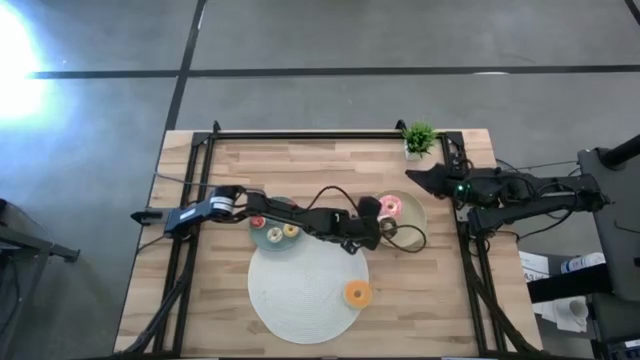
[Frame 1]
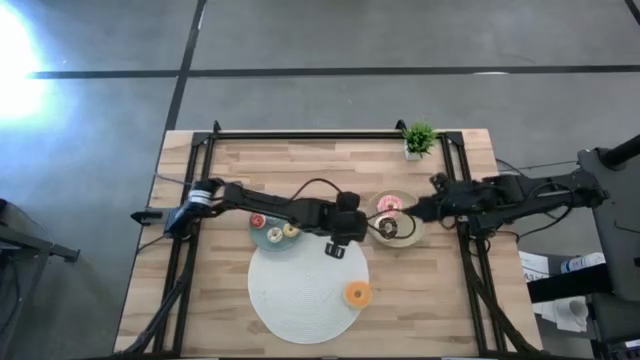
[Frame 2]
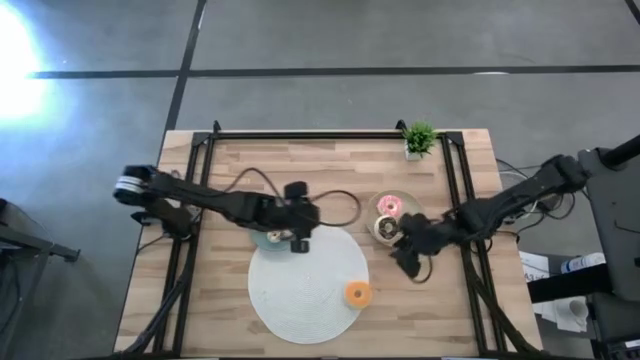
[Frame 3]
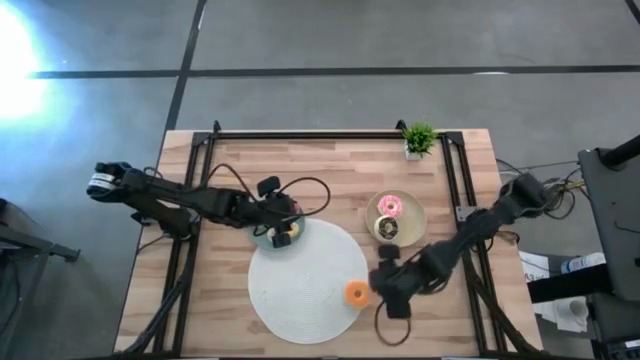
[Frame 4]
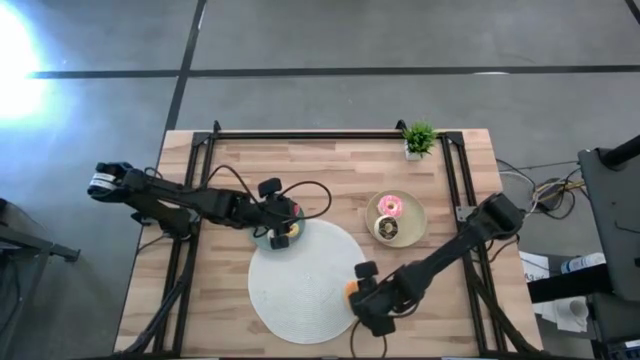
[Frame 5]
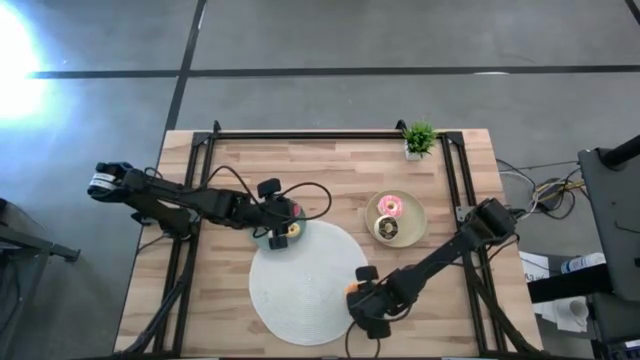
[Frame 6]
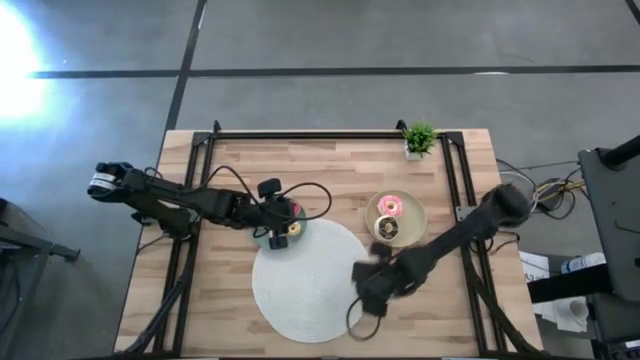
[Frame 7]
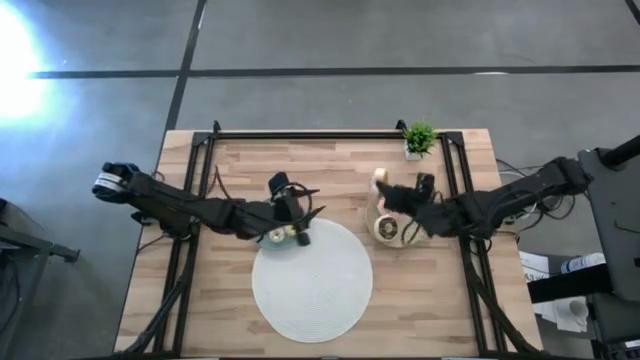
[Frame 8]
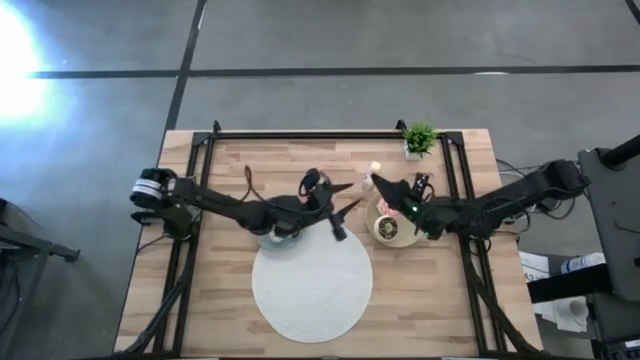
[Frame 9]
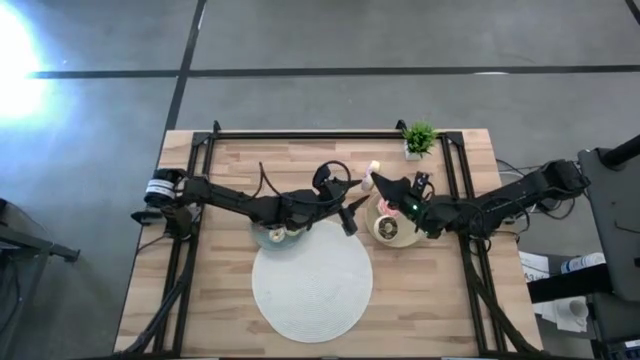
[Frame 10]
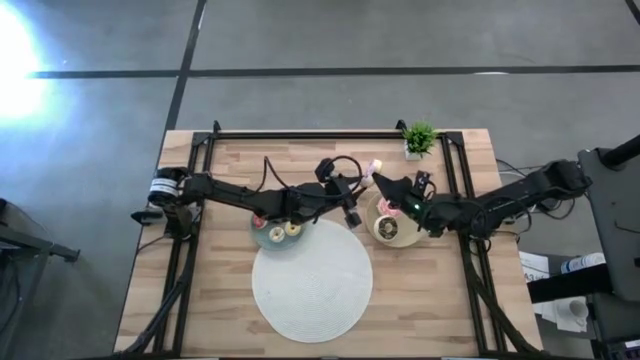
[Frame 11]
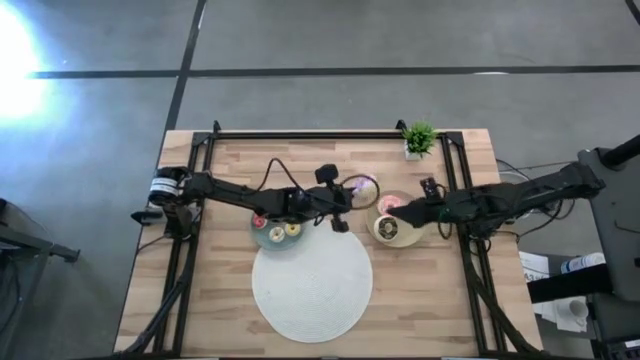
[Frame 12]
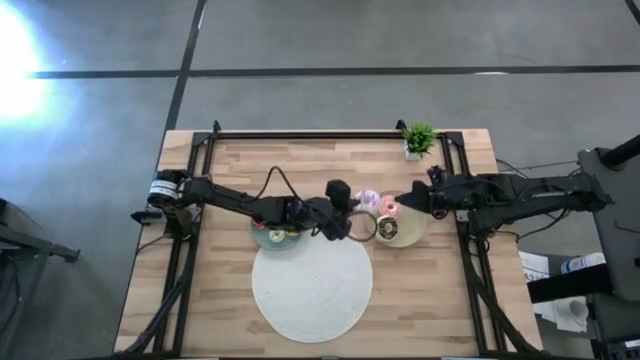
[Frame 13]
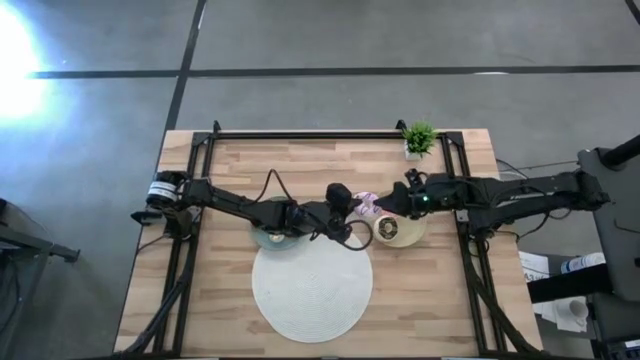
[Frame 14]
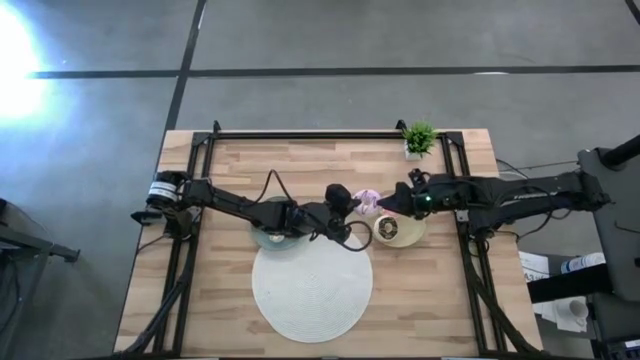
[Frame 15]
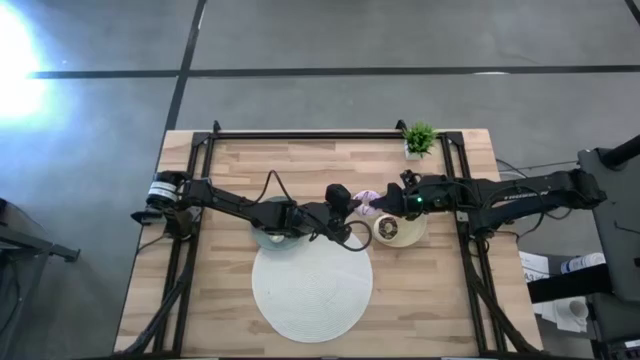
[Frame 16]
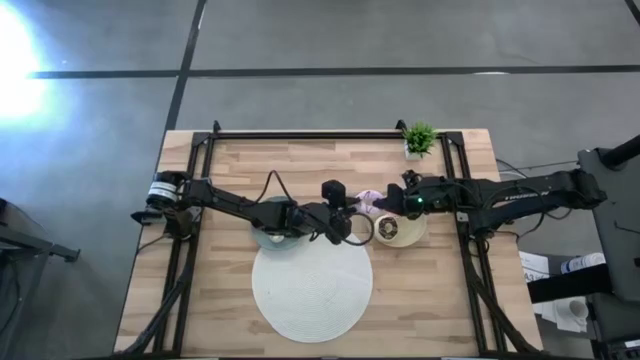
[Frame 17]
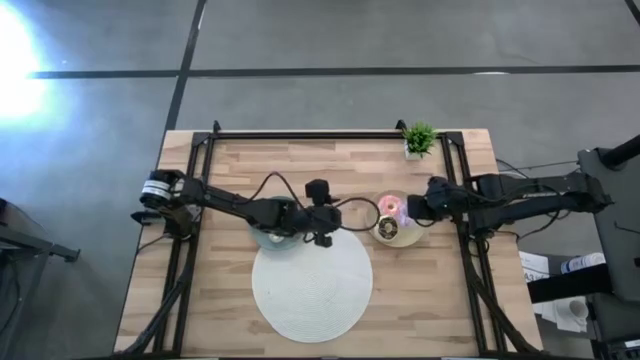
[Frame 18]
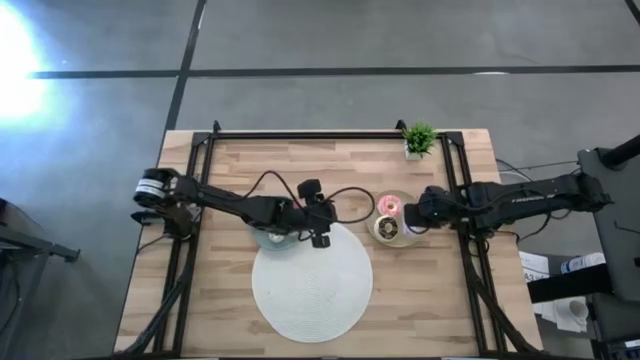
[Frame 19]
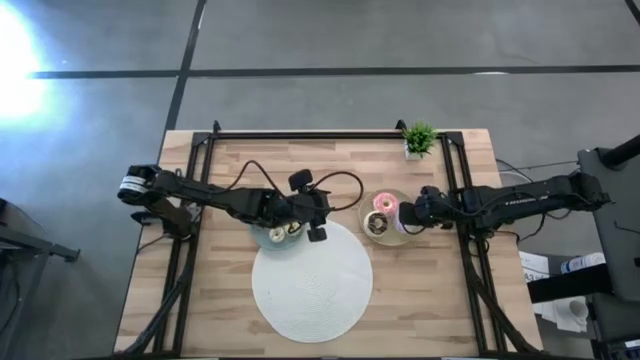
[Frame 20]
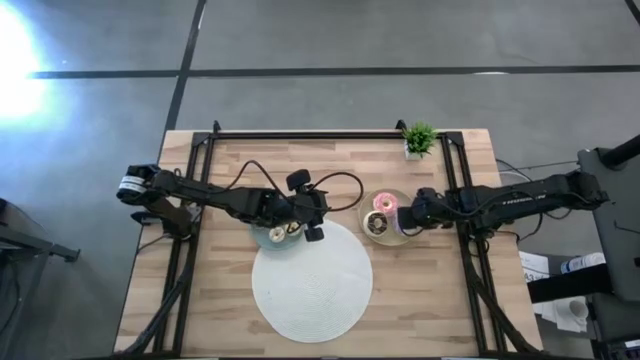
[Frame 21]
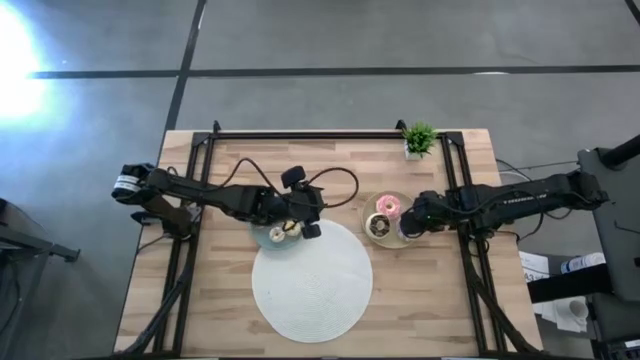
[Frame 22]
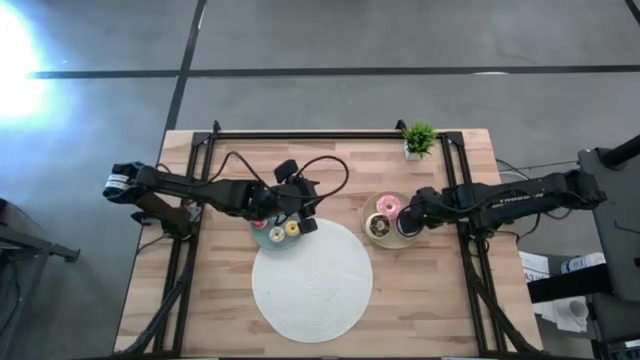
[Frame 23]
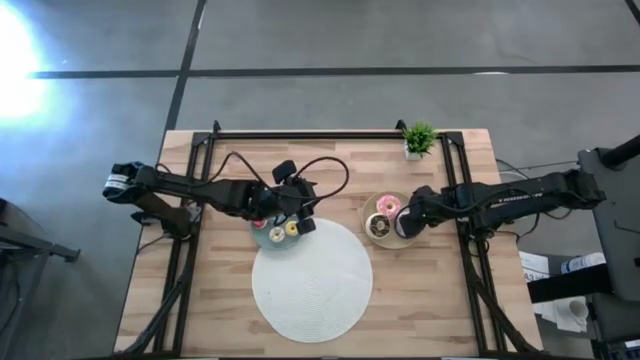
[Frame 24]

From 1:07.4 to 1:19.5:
Task: Pick & Place donuts
Put the big orange donut on the brown plate

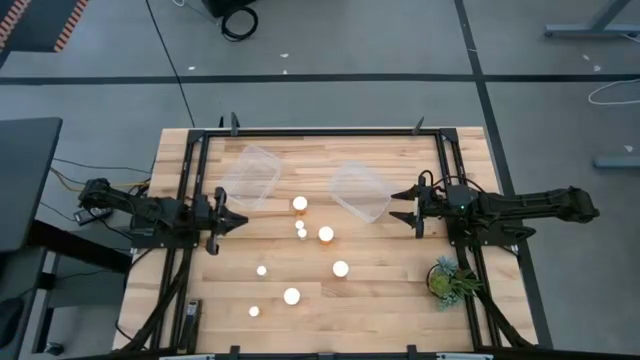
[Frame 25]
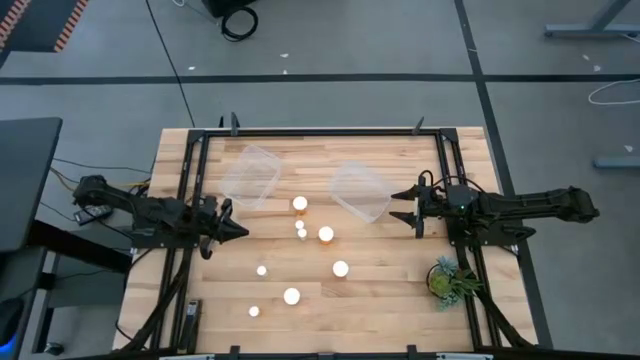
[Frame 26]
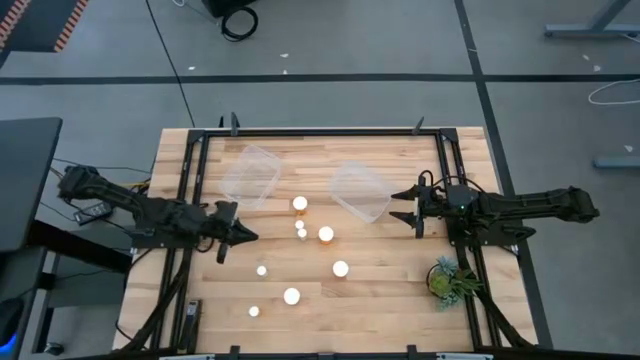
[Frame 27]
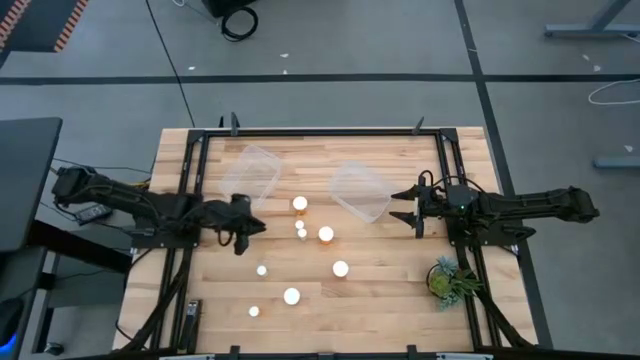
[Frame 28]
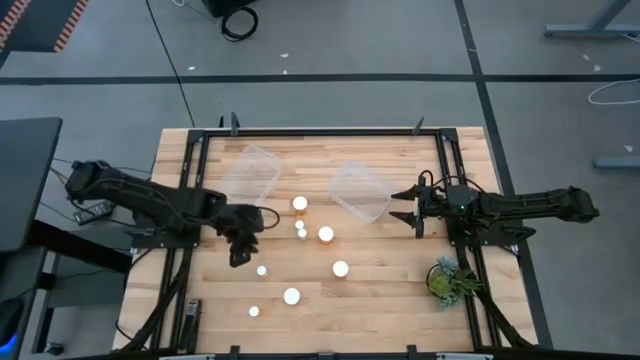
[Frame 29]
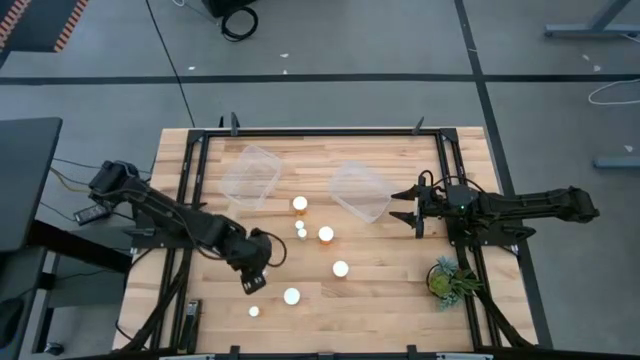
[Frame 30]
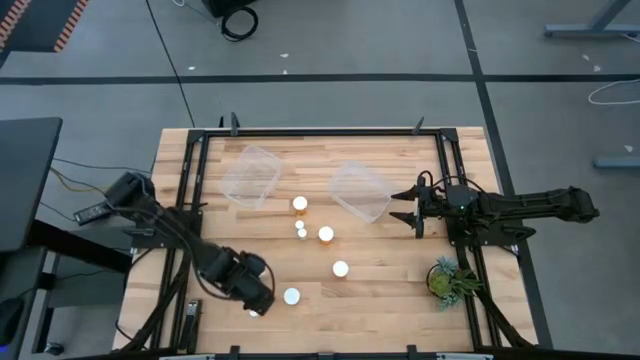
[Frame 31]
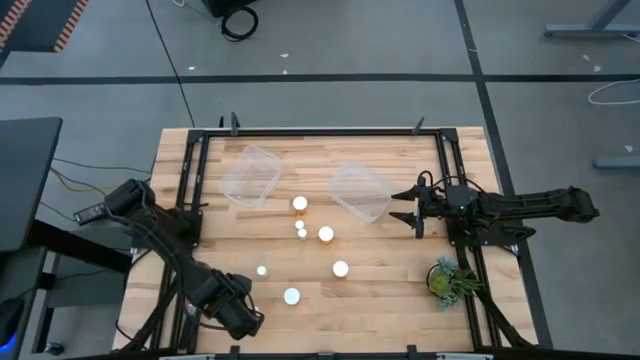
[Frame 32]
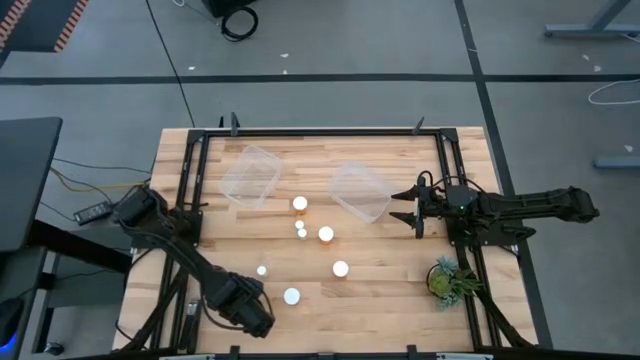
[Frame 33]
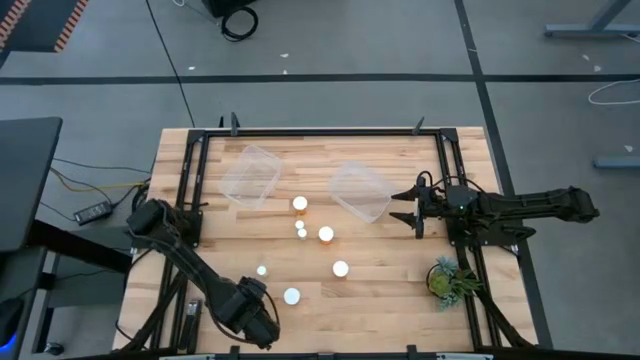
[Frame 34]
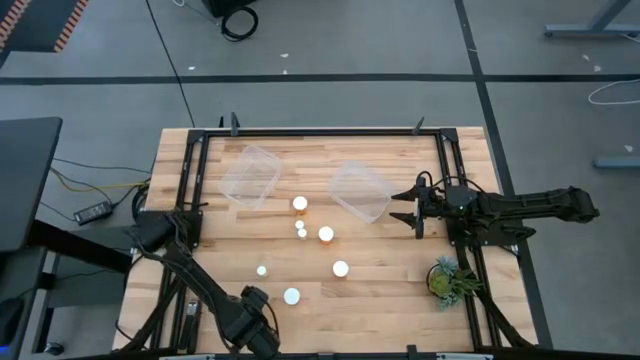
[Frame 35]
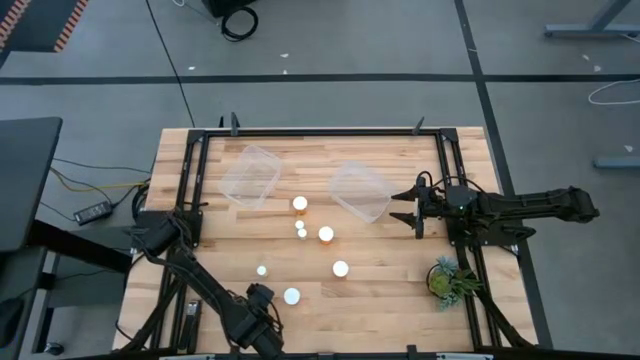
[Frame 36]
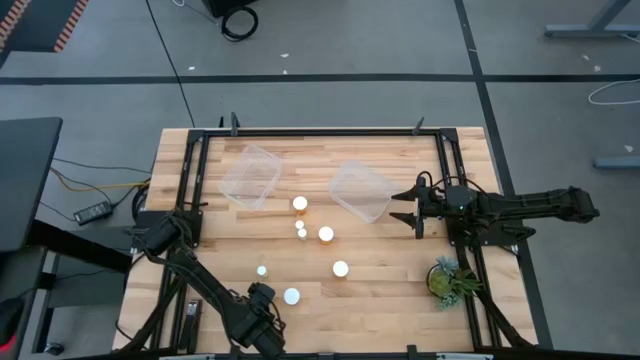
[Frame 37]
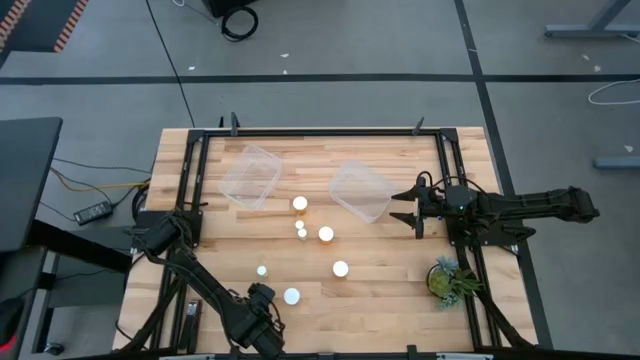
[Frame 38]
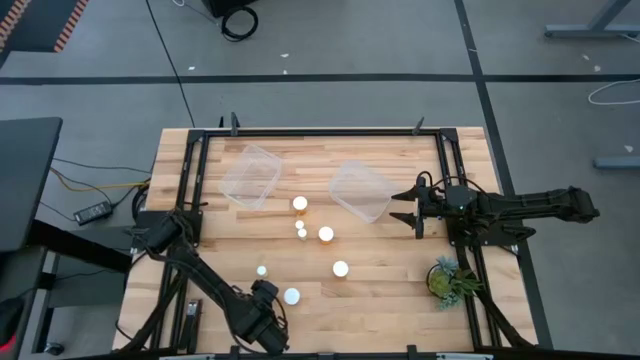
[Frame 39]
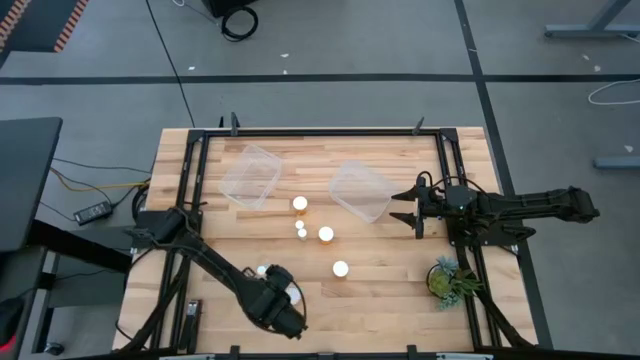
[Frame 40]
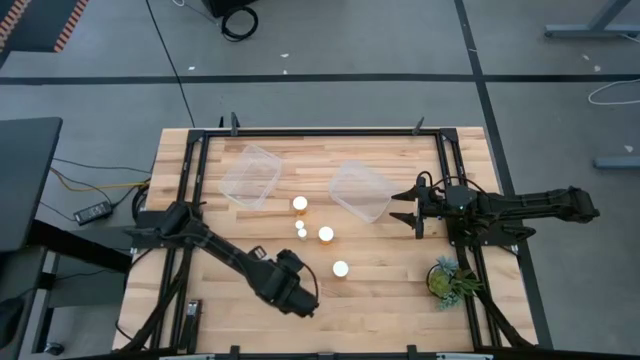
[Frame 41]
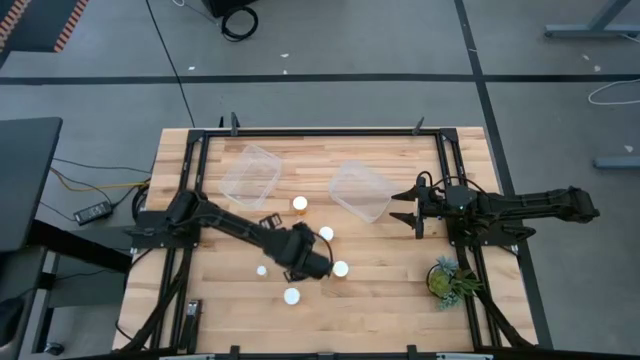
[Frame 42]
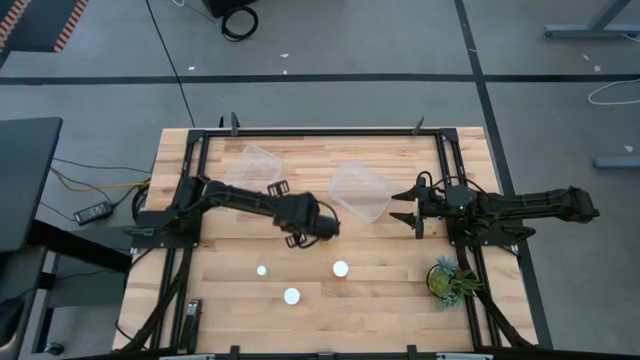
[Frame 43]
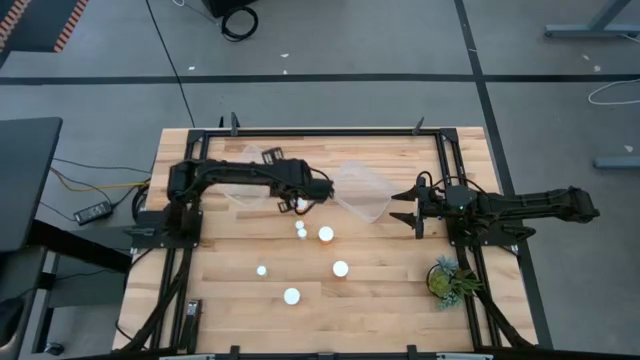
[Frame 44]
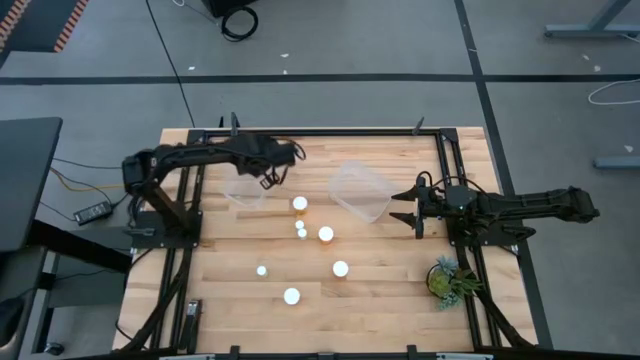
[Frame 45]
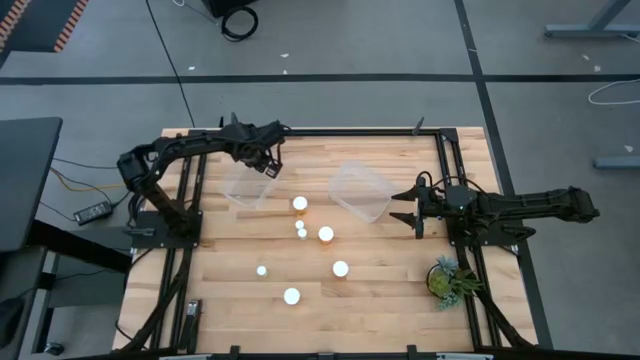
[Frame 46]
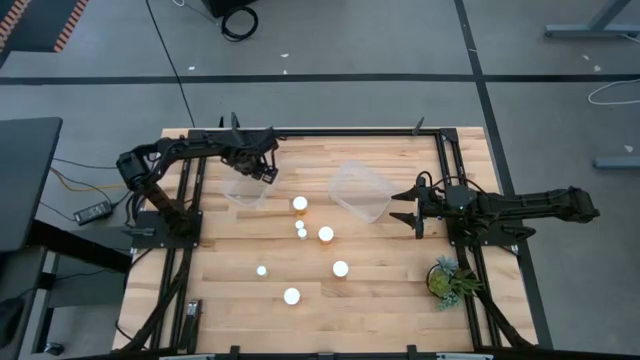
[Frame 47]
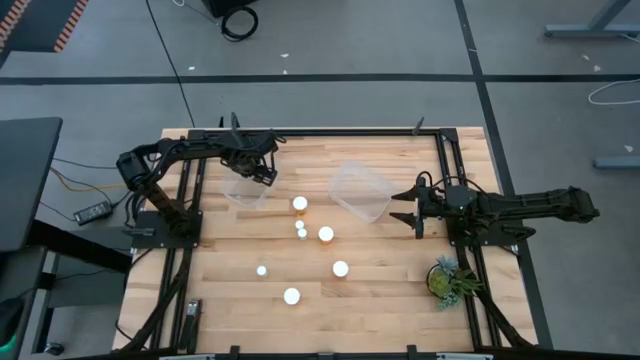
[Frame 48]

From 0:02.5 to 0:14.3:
Task: Pick and place medicine bottles into bin by pill shape (circle, oval)
Put the small orange pill bottle into the left transparent bin
